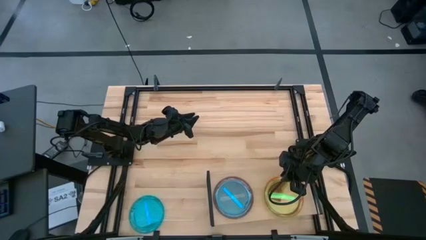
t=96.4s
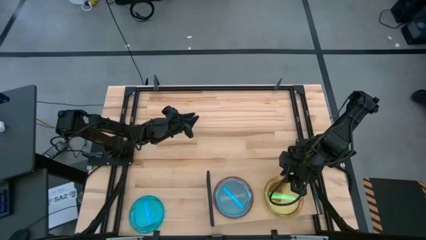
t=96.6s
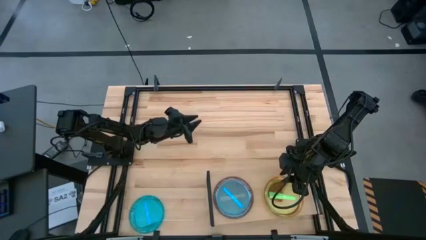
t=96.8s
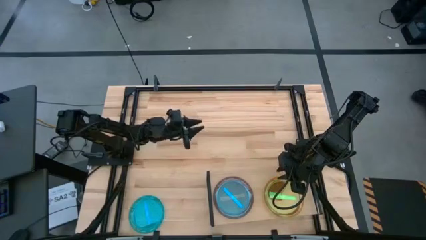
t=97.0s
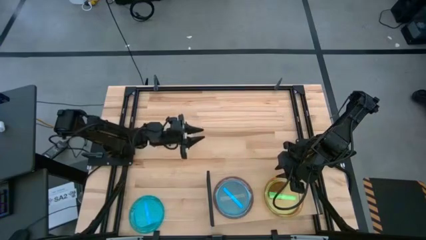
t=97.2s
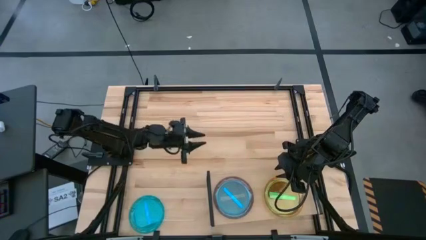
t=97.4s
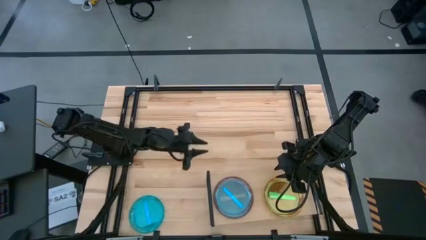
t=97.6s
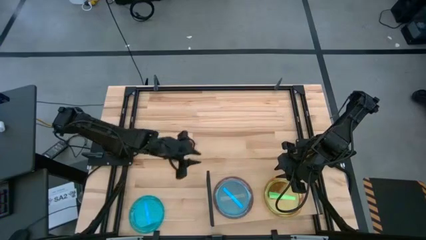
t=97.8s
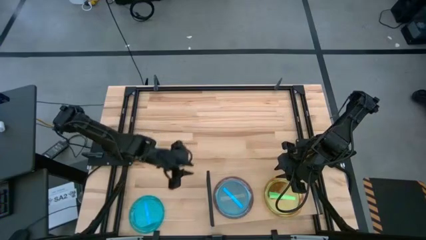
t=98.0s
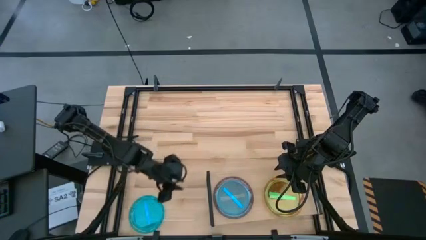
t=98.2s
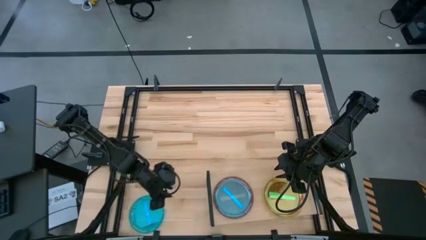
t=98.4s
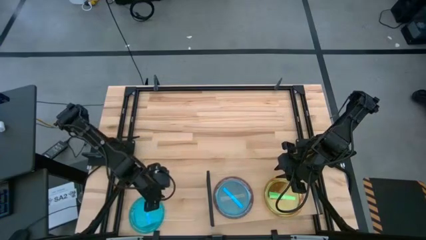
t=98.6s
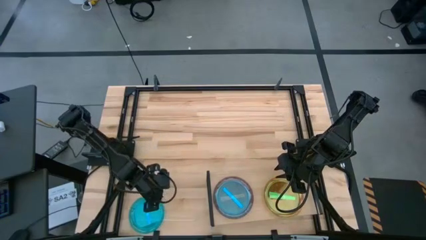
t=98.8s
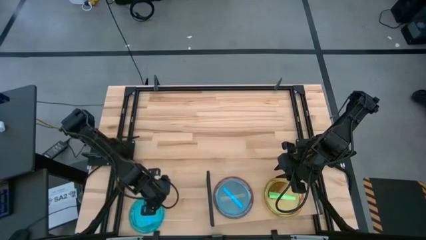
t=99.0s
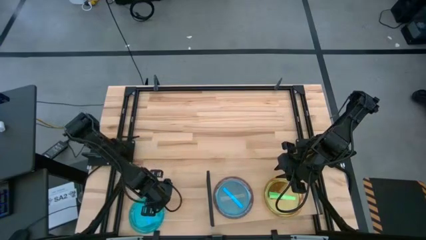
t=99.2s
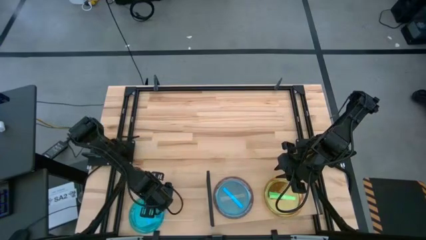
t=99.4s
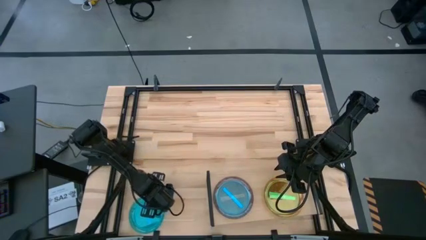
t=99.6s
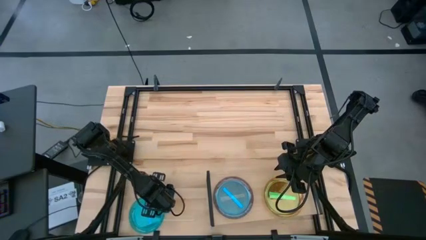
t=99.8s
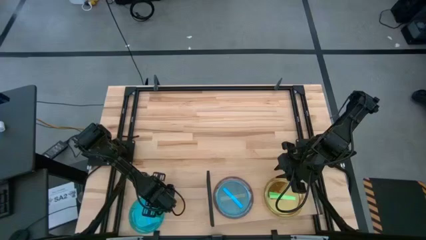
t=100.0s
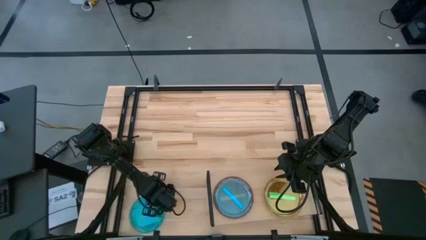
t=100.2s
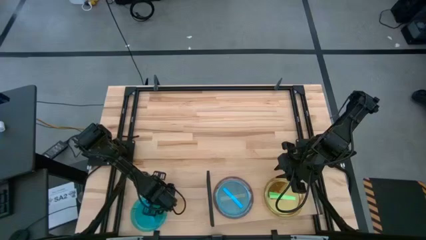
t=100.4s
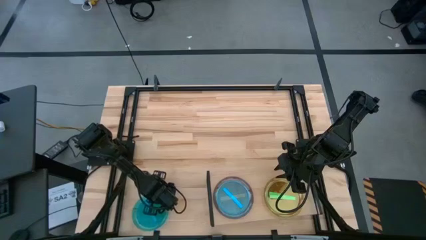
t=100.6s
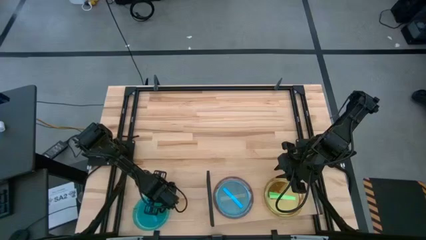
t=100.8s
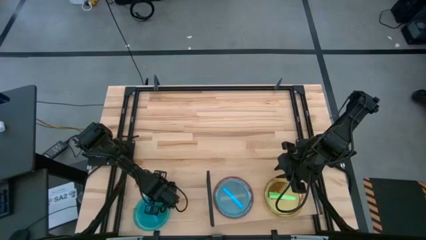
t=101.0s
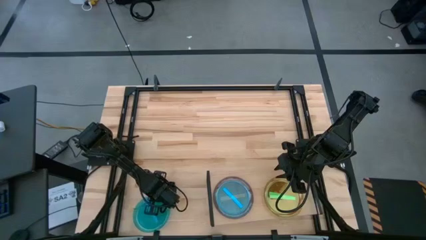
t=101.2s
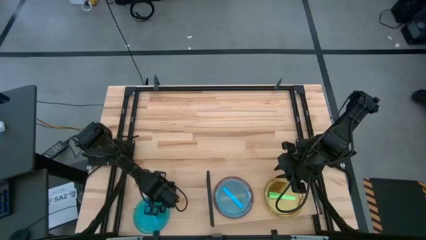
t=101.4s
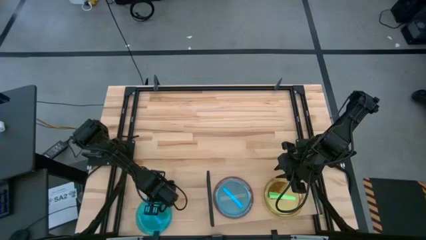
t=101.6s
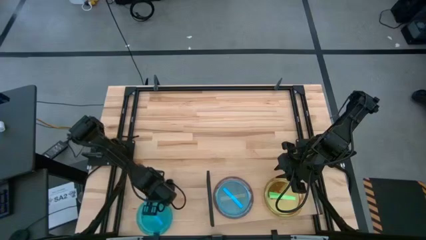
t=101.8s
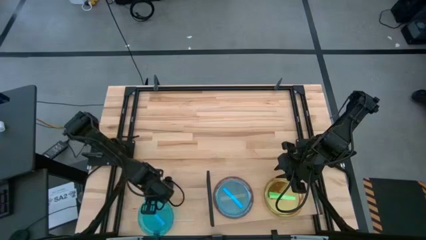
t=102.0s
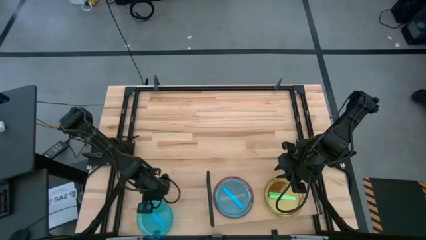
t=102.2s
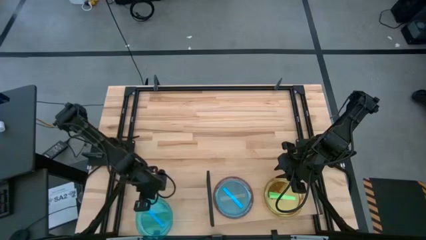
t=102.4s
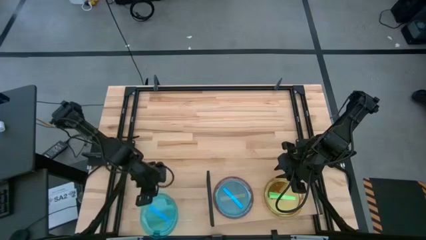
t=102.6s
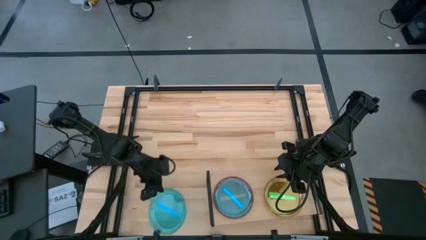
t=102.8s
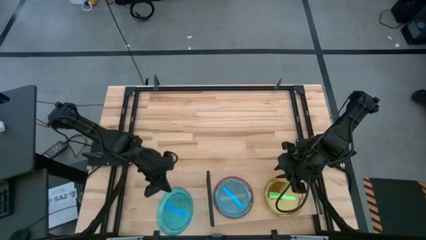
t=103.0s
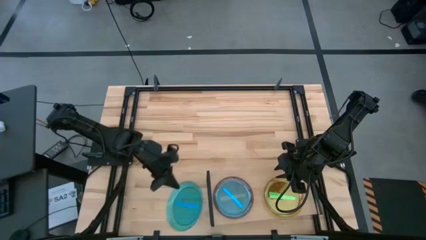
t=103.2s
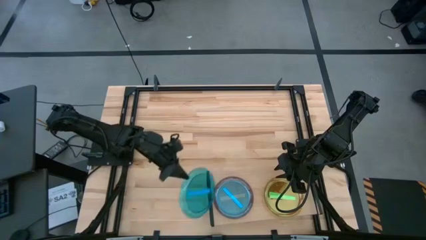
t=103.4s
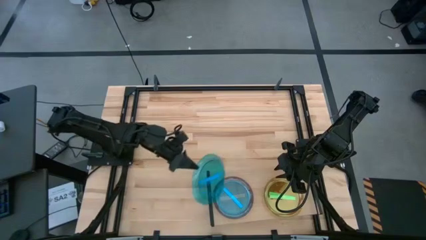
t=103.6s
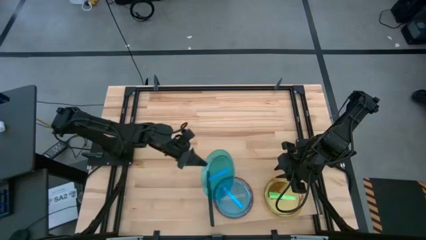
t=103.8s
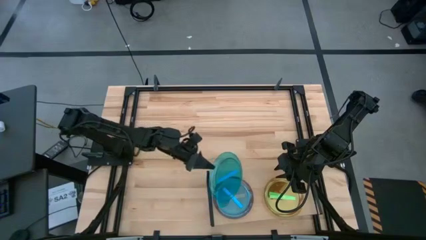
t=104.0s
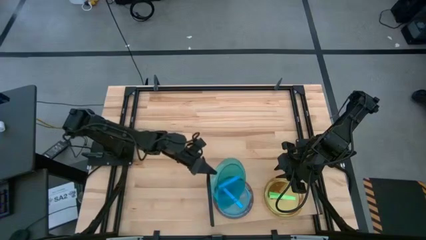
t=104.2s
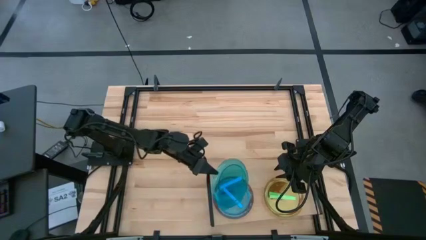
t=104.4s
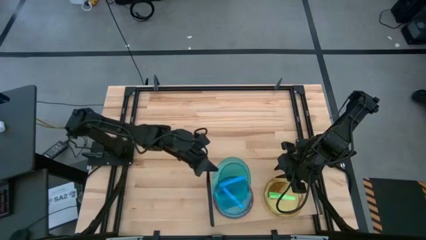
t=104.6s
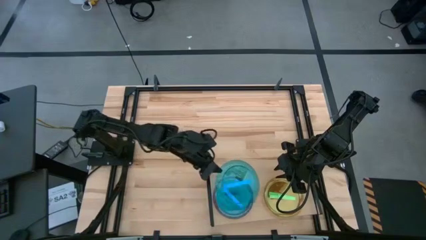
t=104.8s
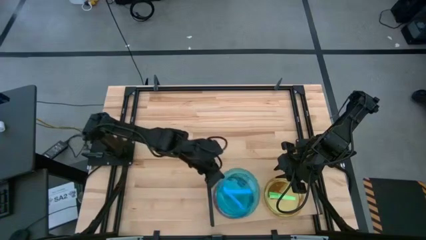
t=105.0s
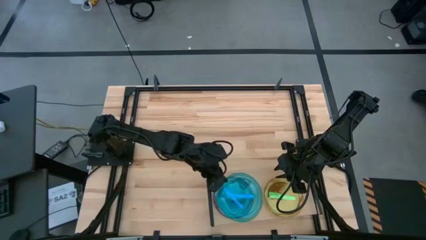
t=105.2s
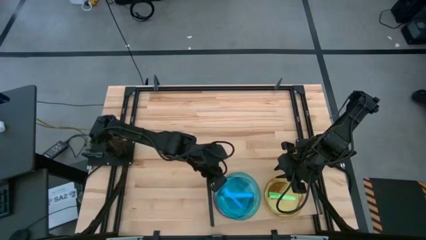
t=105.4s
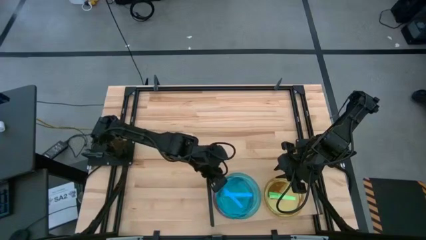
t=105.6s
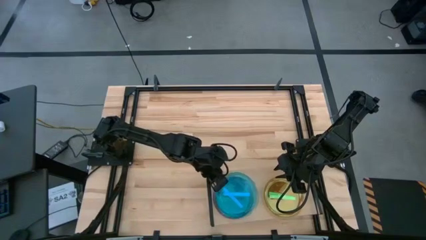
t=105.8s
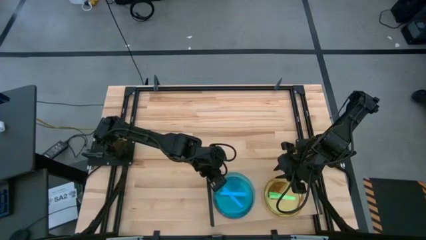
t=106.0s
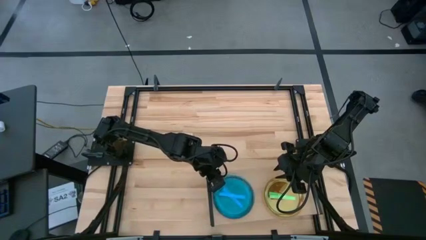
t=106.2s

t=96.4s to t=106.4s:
Task: Place and stack plates onto a shelf
Stack the blue plate on the blue plates on the shelf

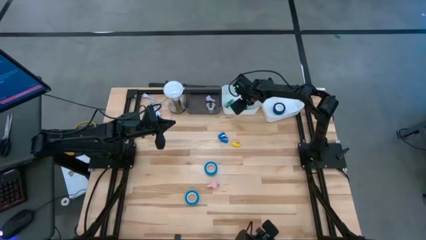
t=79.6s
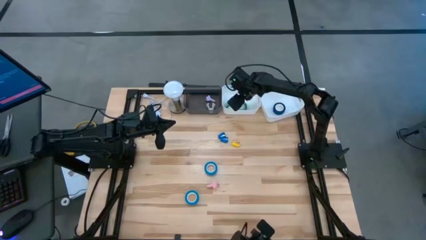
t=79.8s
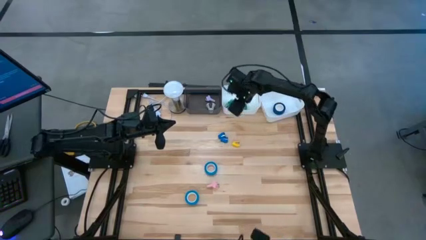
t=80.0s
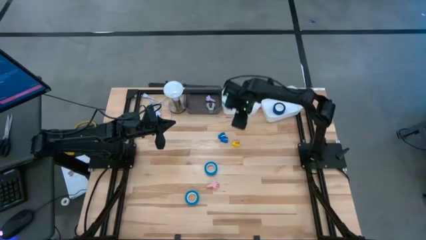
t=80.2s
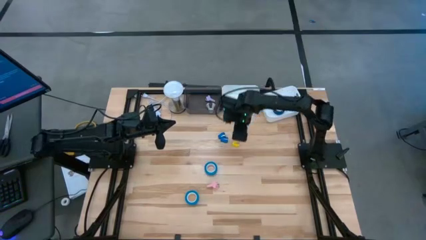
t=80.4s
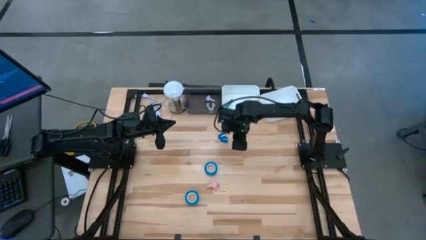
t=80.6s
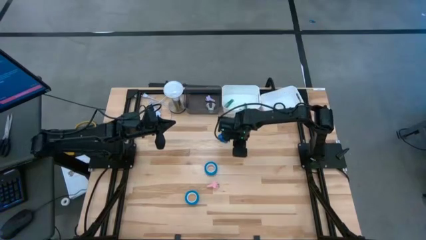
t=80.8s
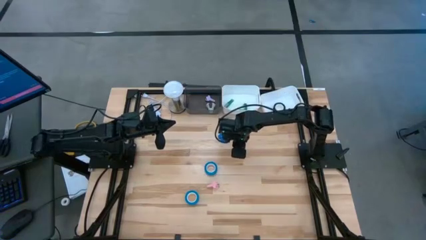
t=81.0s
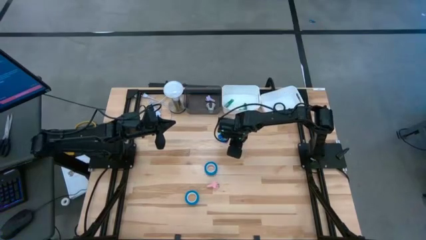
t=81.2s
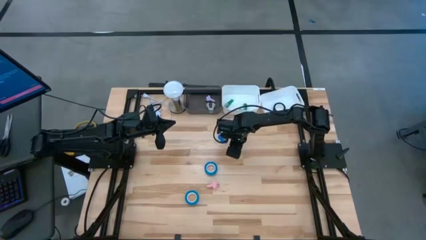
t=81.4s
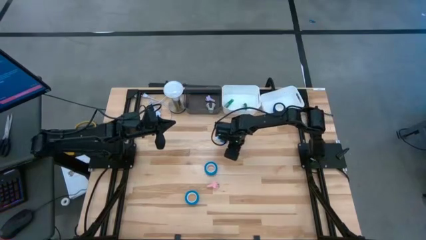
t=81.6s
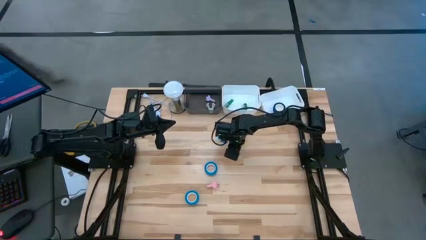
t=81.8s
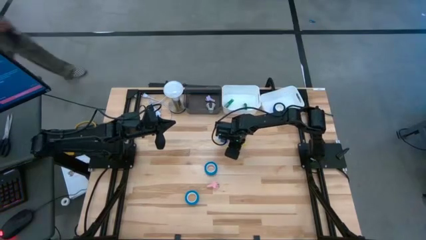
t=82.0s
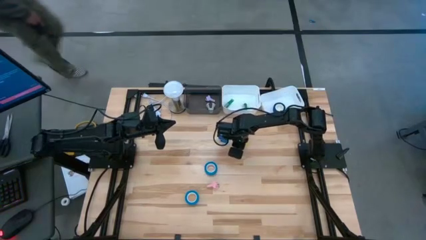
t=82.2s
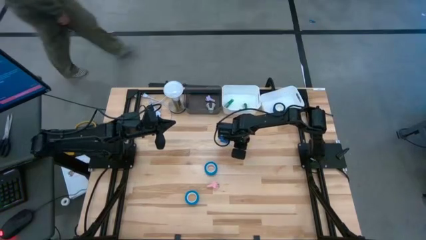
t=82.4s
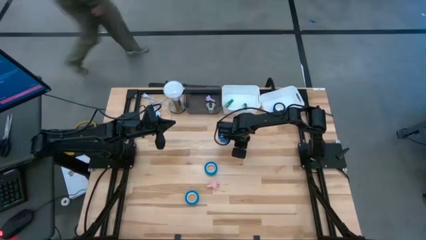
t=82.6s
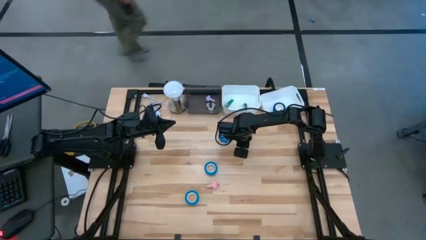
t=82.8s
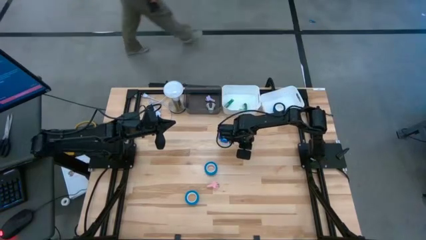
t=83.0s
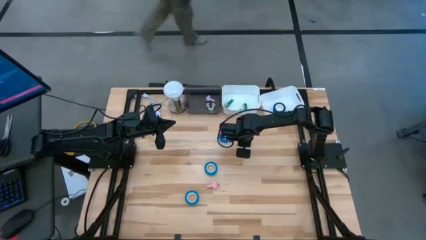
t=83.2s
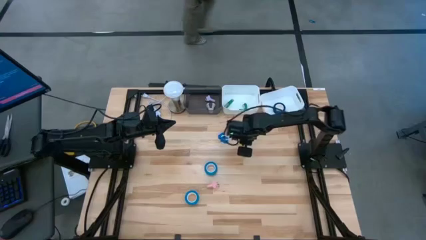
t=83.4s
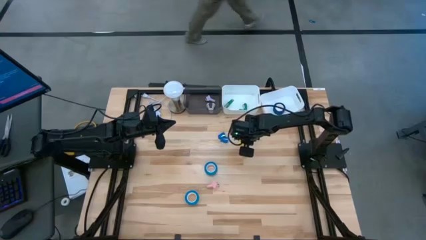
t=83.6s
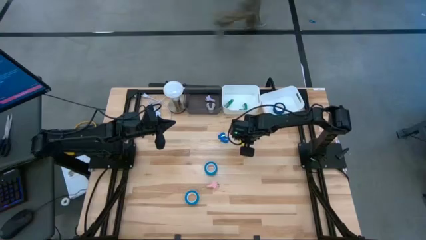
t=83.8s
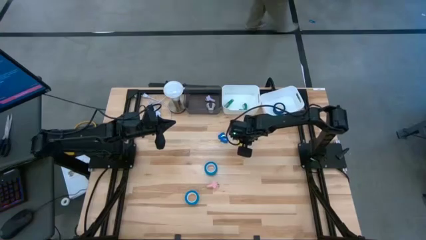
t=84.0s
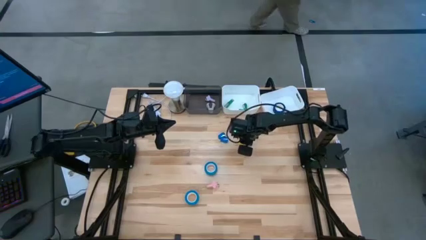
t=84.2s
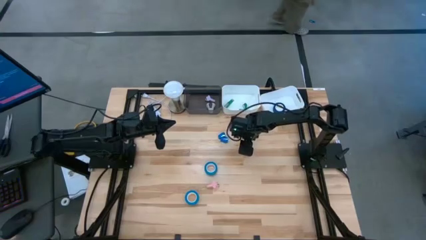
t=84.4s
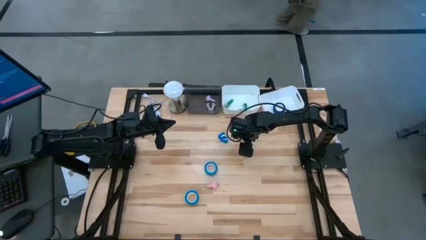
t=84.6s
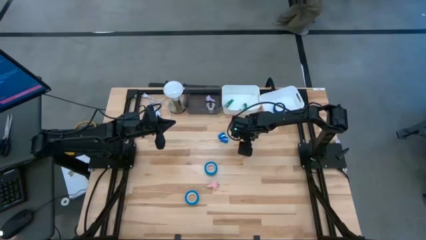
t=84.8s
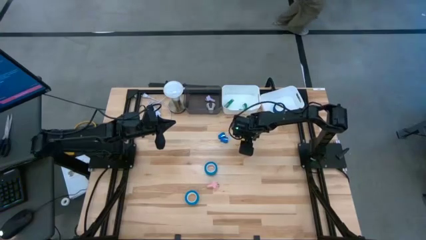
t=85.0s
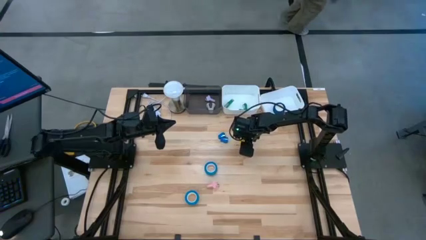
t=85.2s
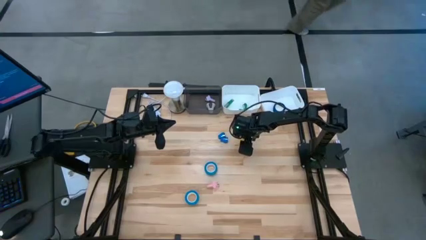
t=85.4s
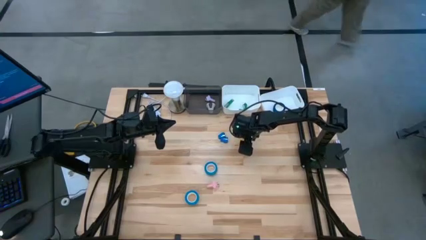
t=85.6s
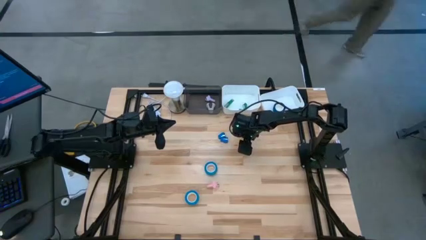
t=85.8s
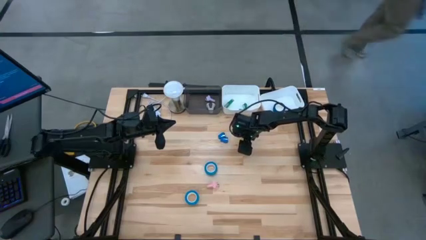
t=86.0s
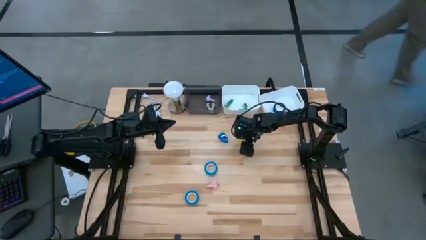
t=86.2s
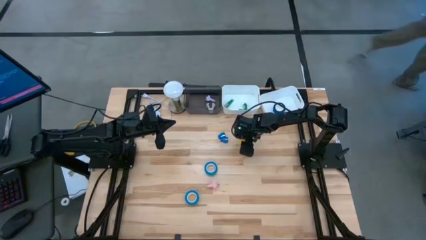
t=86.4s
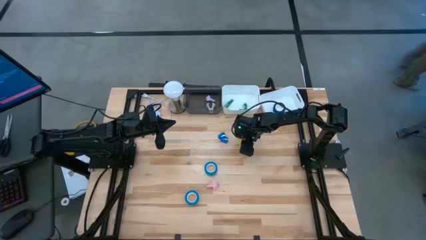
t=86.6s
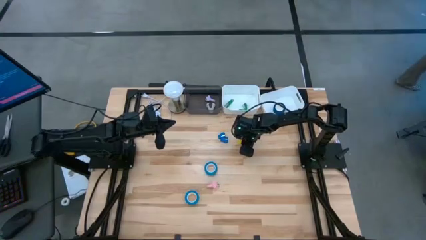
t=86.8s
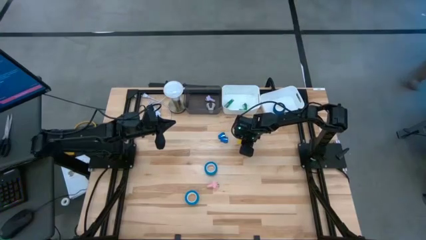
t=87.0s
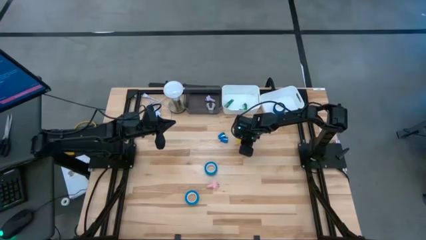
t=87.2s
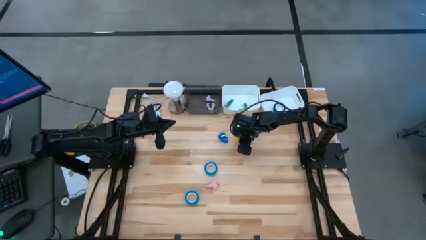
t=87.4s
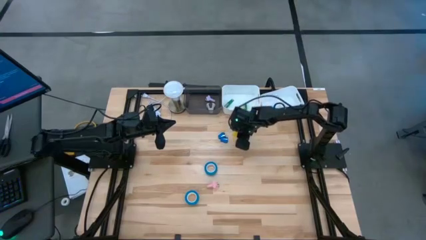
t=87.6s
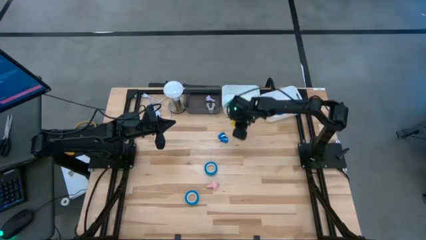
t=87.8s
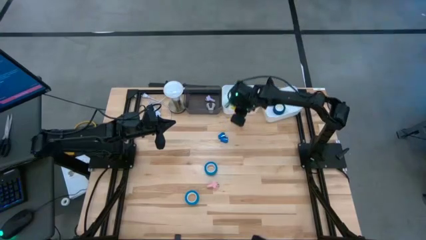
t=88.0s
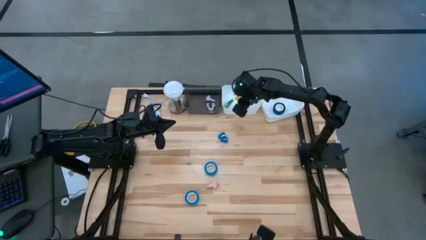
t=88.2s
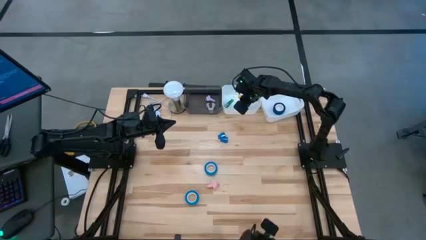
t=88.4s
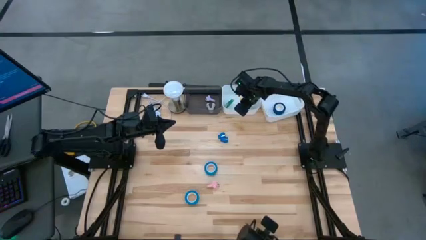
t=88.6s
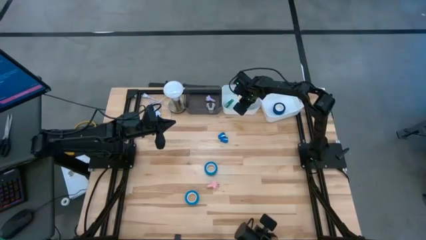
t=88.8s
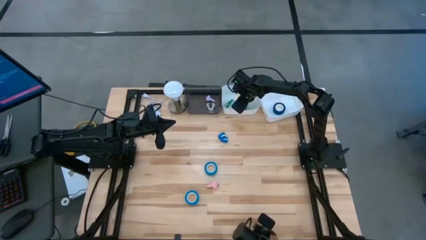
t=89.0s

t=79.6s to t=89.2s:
Task: Pick and place Stapler, Stapler remover, tape
Put the yellow stapler into the left white bin
